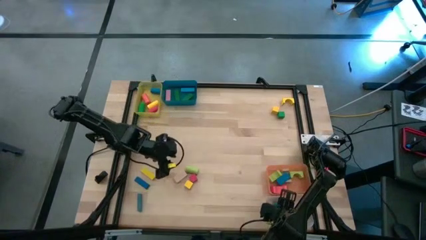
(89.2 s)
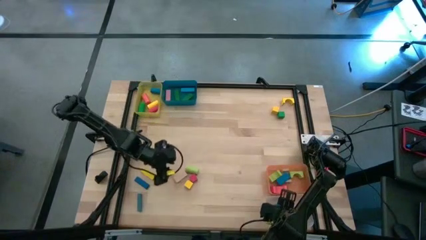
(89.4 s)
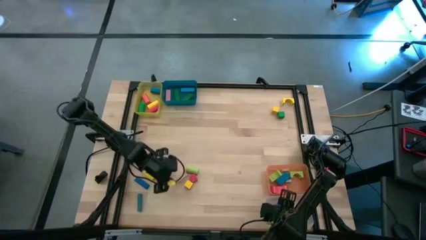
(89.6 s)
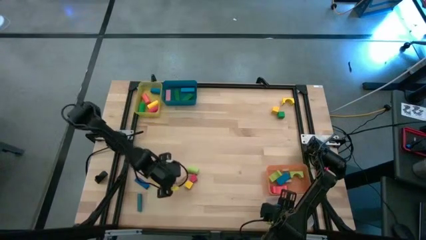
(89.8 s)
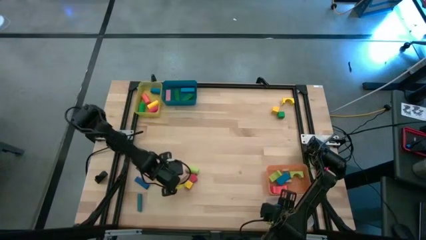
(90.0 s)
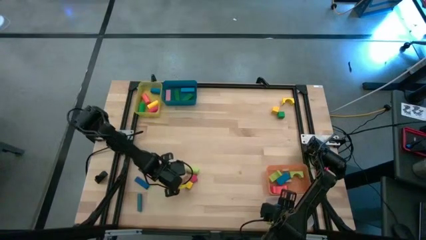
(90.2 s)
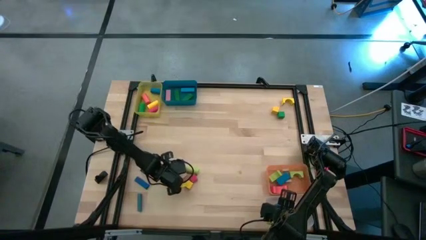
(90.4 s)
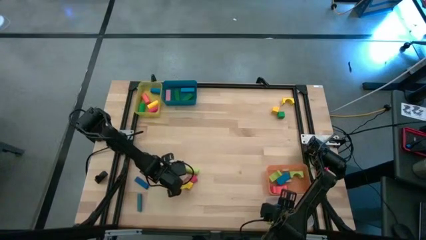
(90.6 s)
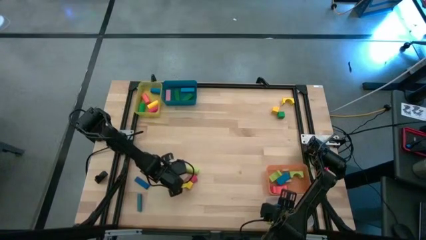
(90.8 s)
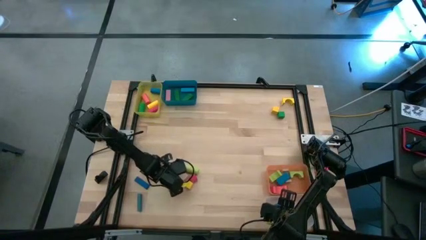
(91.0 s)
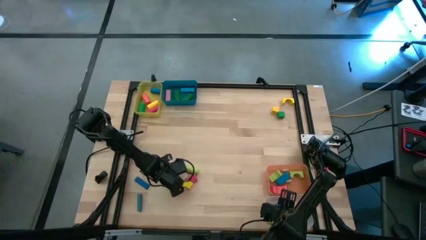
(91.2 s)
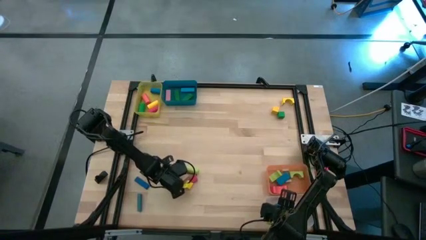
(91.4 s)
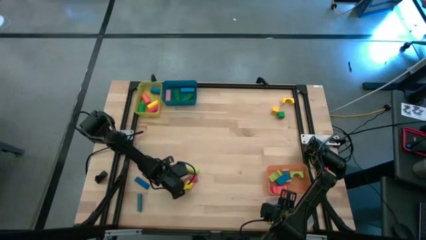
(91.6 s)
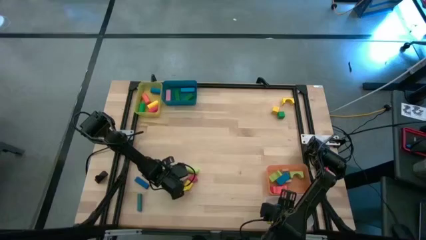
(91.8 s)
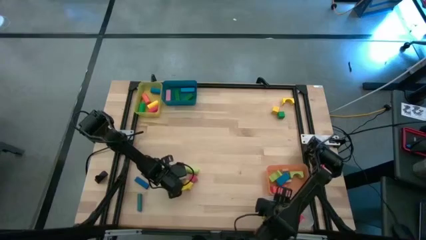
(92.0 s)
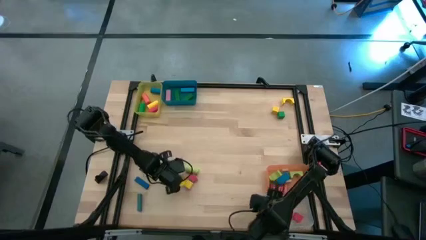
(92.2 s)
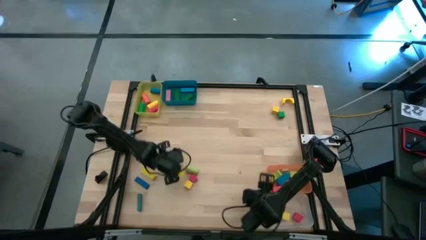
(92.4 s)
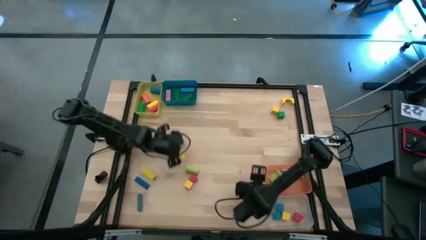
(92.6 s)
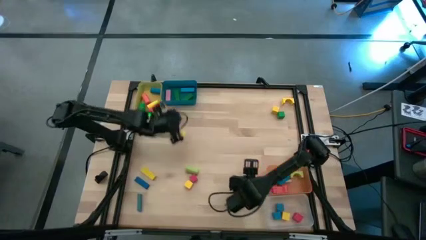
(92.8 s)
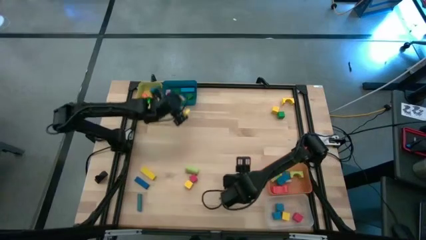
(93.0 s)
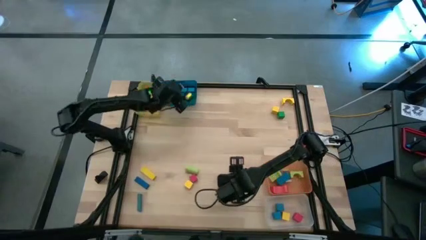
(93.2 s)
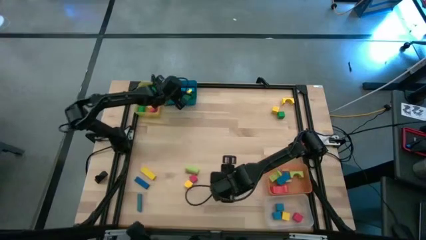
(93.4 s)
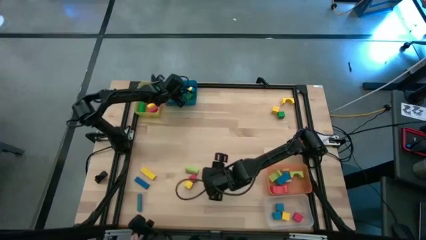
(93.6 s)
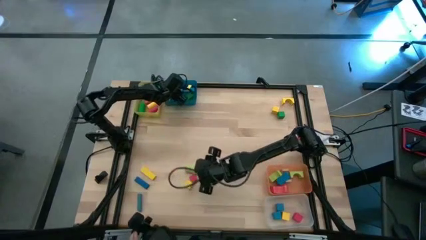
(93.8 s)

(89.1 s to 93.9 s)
Task: Sort blocks by size
Put the light brown rectangular block into the blue bin

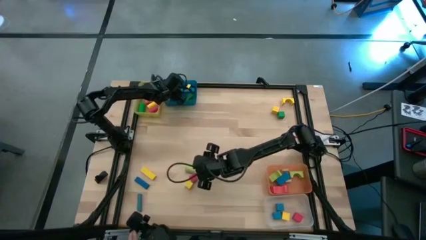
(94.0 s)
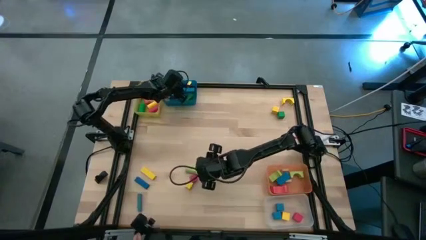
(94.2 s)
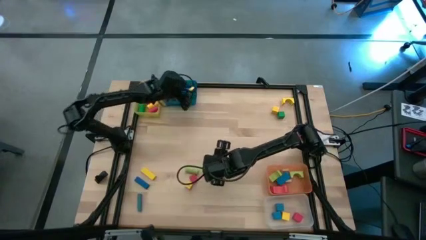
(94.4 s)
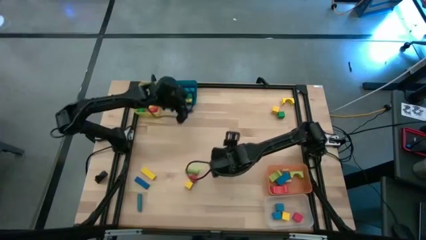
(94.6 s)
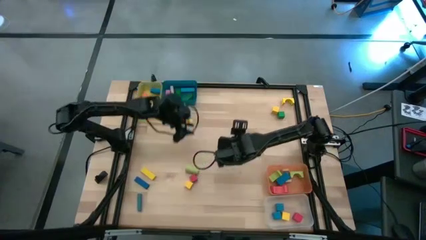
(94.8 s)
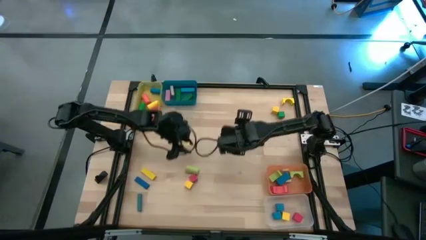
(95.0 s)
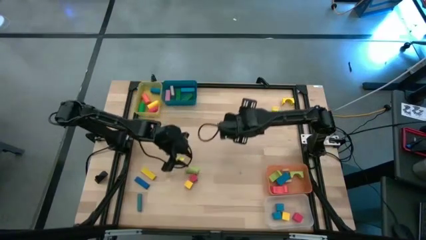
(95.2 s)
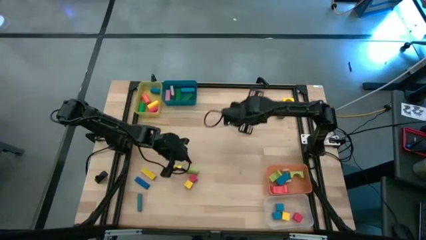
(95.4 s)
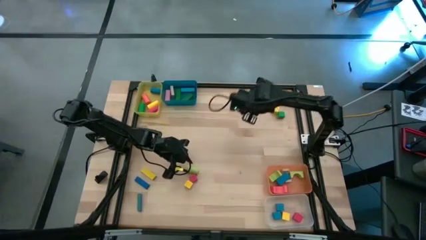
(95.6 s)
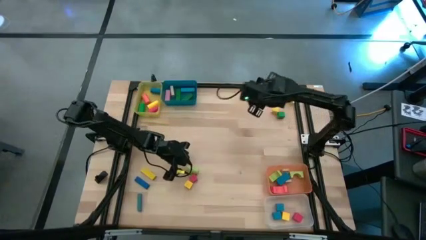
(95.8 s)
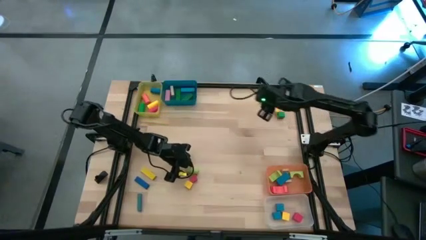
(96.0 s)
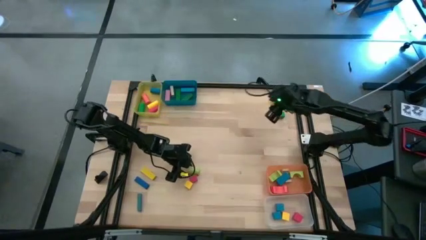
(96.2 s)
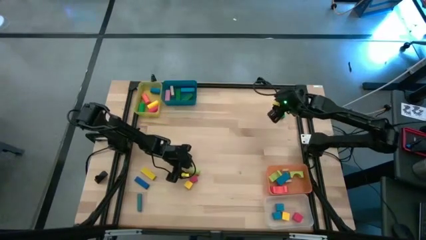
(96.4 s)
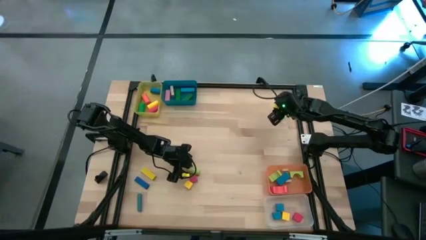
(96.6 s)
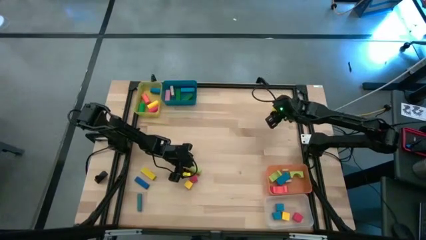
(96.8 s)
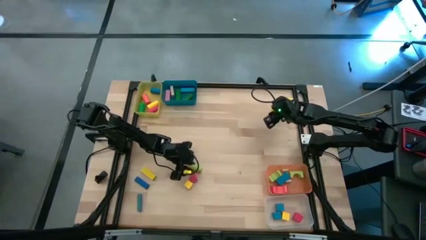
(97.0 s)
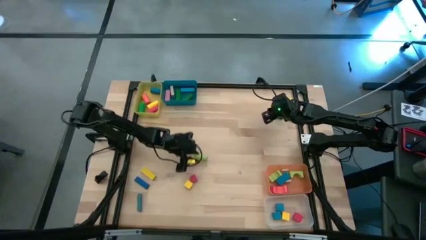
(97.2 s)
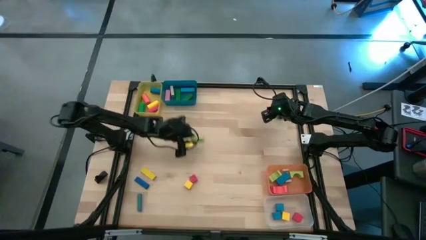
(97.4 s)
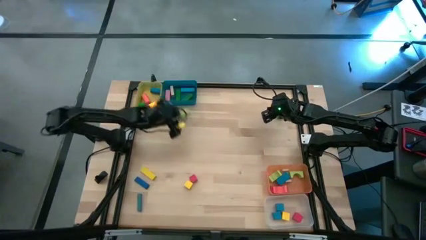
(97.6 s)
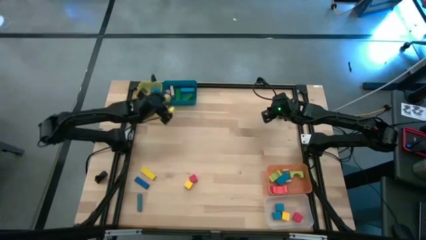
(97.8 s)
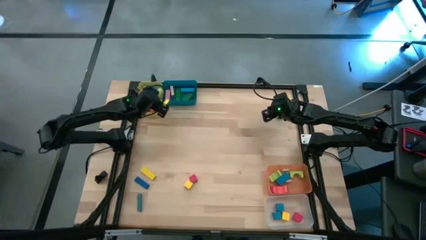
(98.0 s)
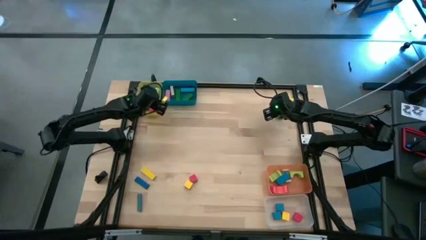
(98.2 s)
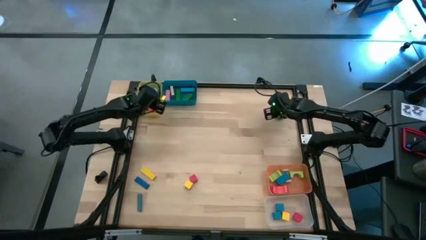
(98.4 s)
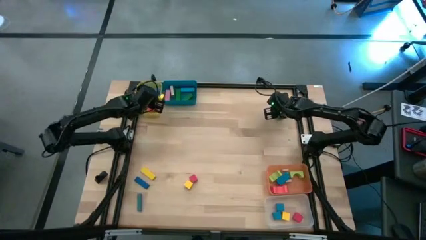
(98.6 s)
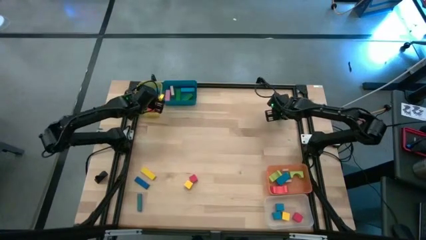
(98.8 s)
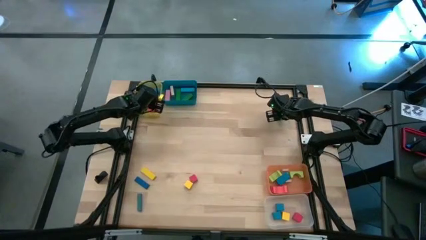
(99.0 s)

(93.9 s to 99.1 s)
Put the light green cylindrical block into the yellow bin

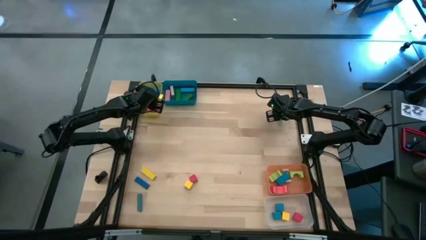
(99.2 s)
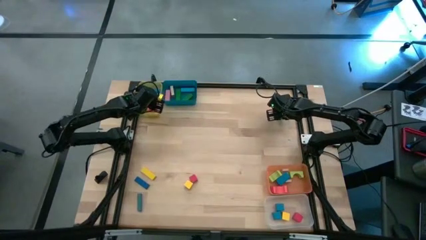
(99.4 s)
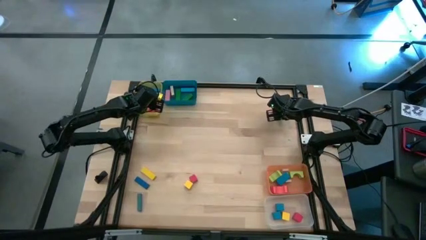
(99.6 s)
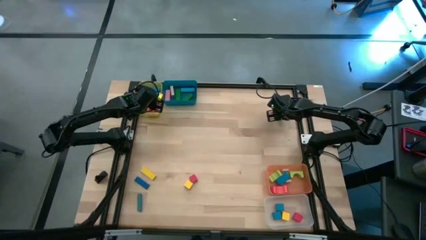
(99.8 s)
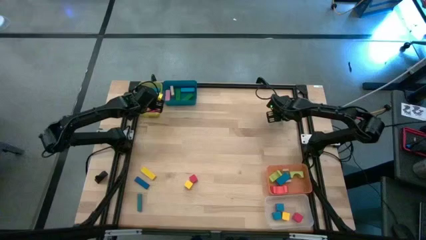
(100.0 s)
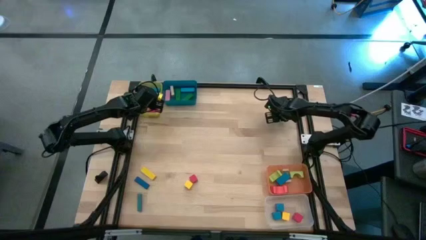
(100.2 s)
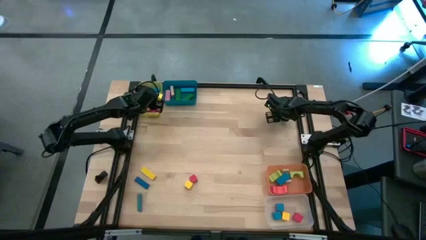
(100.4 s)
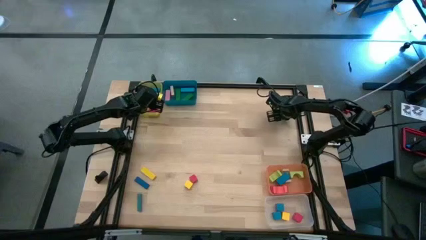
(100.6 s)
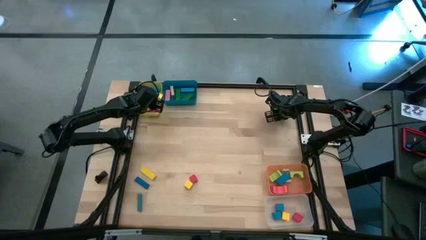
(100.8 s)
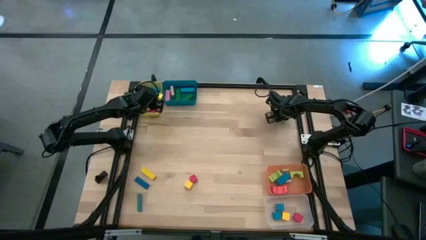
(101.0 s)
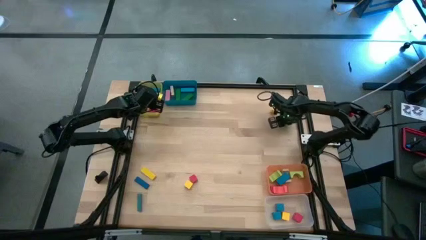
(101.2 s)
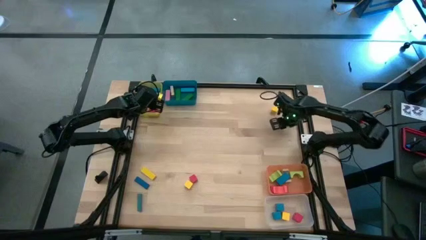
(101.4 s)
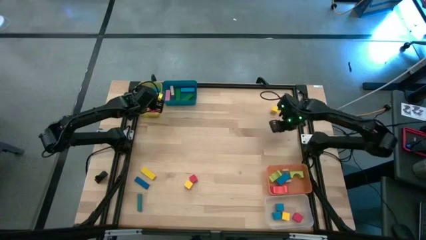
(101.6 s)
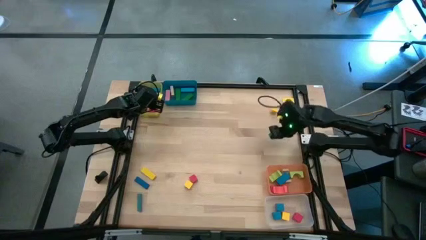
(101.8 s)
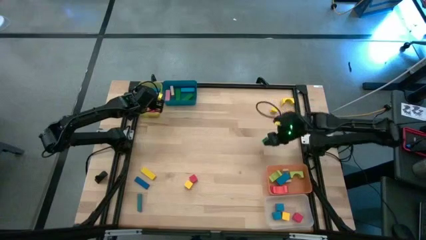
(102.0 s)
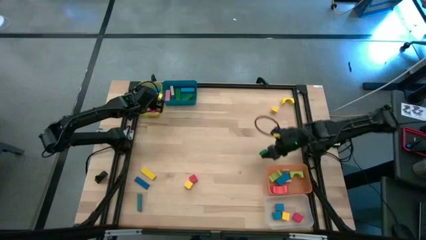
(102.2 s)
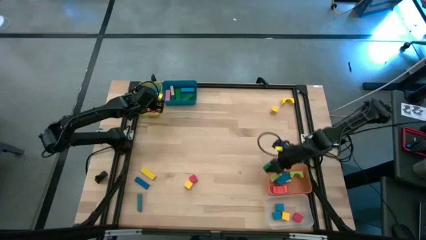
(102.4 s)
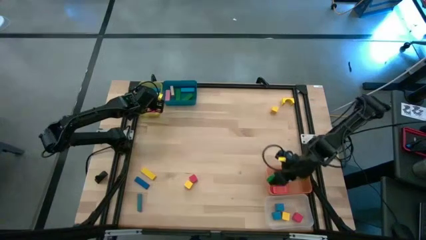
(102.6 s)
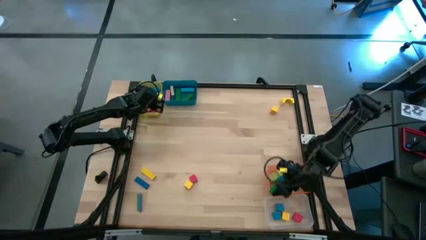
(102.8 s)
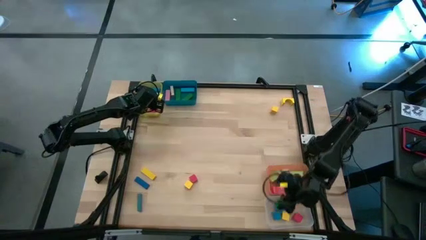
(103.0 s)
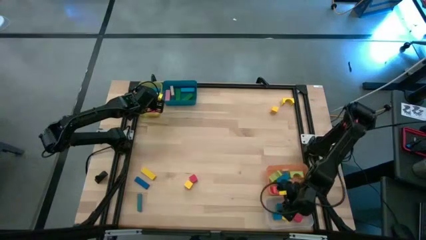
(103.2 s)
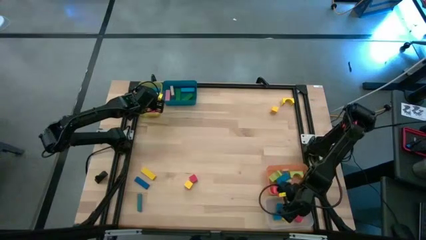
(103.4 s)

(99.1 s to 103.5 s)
Put the green square block into the transparent bin

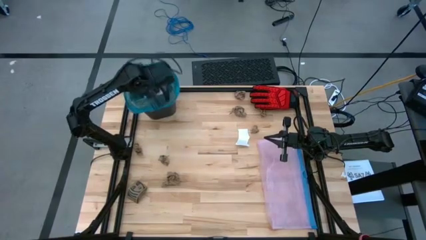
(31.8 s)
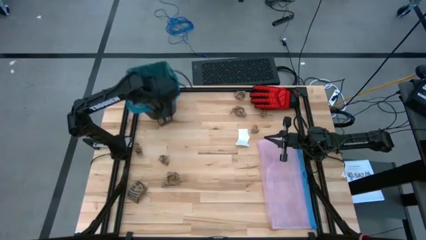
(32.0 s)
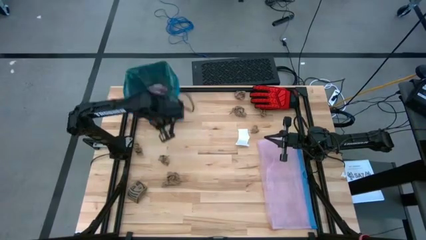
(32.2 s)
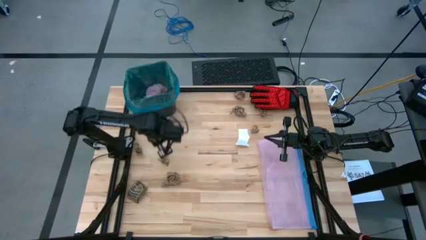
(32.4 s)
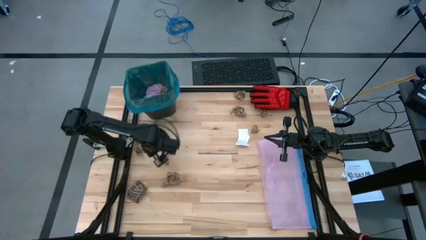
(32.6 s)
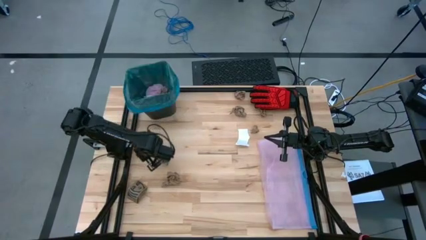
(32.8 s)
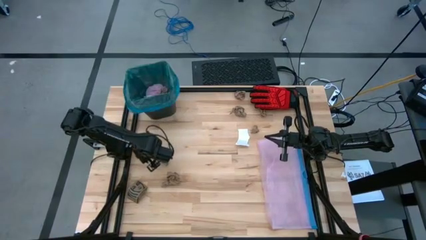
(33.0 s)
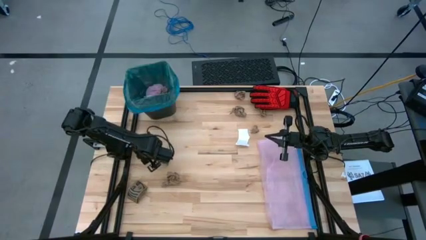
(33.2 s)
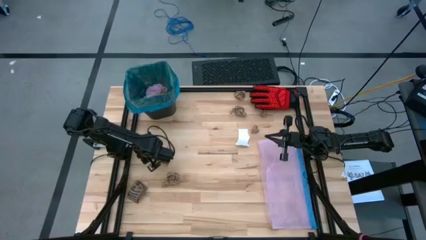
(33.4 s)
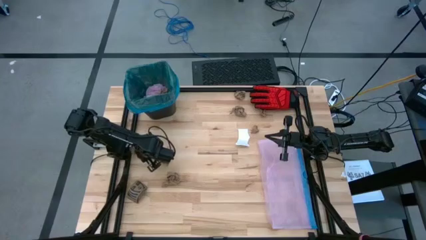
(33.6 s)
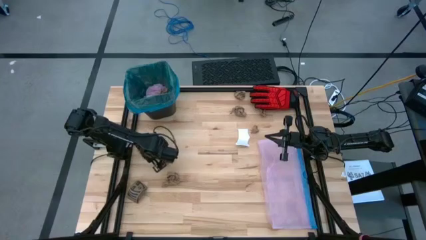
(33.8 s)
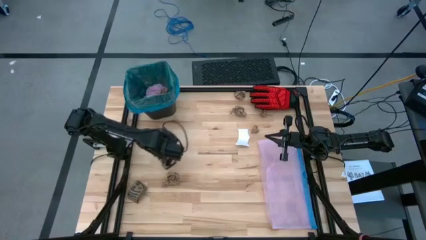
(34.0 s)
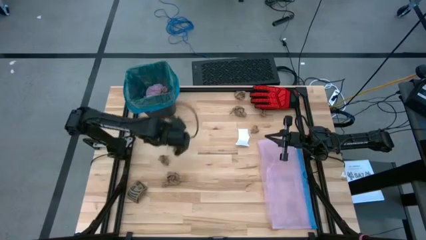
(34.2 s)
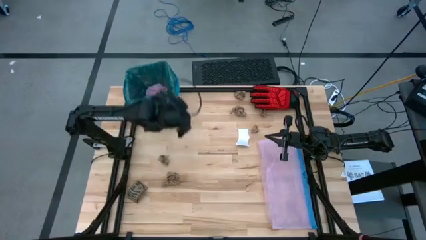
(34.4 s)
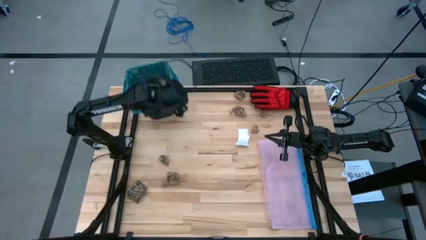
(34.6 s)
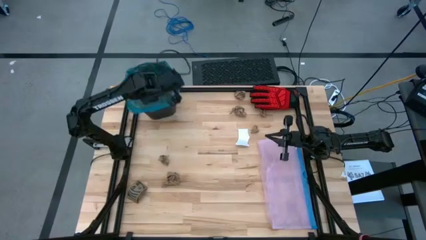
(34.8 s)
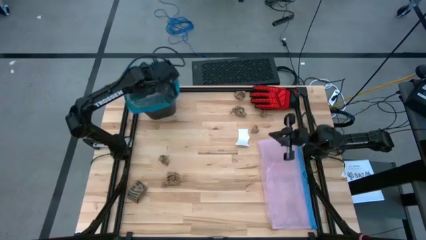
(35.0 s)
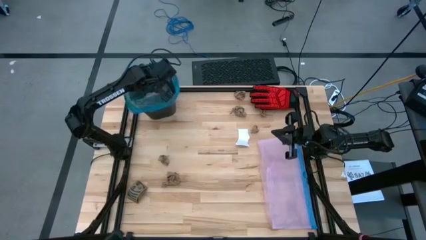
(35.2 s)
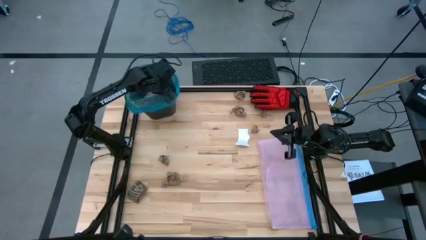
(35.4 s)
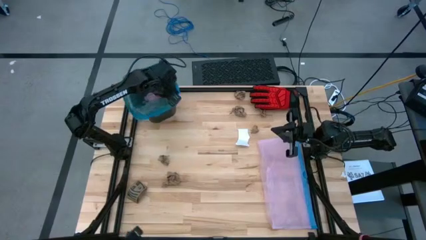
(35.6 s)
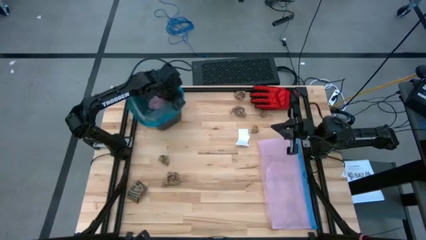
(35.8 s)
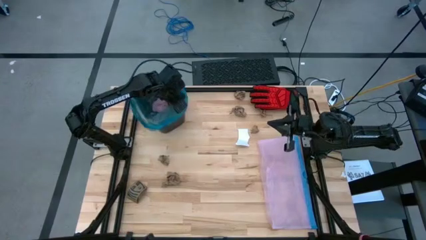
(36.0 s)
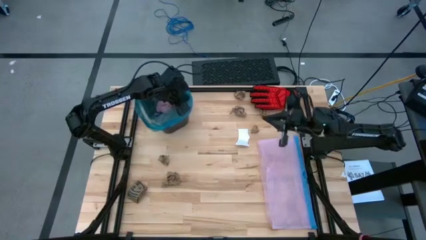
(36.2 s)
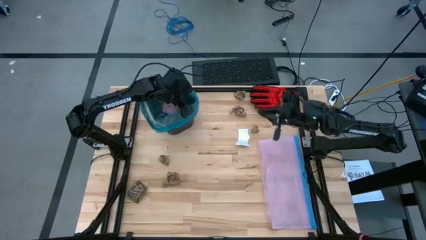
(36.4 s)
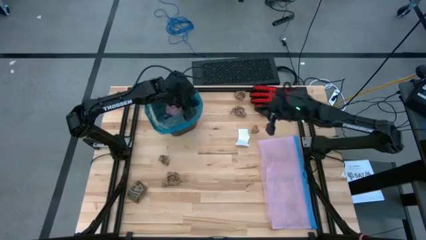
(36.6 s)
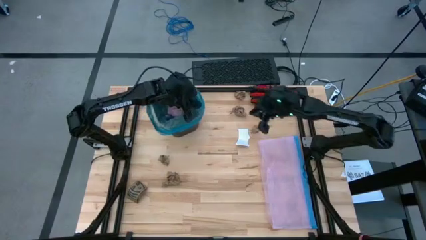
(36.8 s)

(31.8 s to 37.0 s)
Task: place trash/remove bag and relplace
Put the brown napkin into the black trash bin
